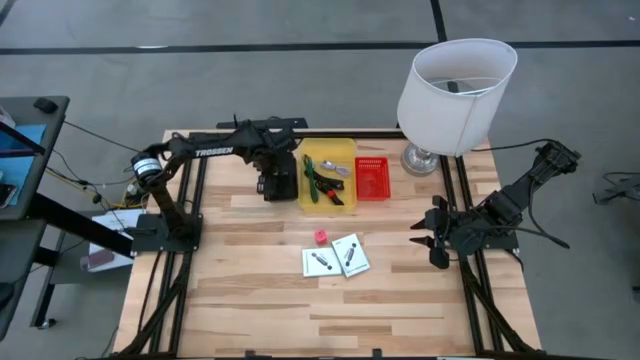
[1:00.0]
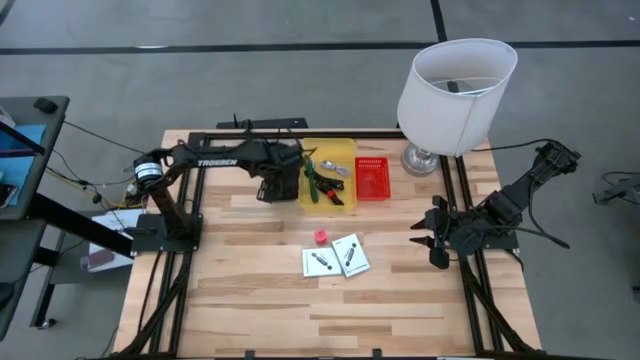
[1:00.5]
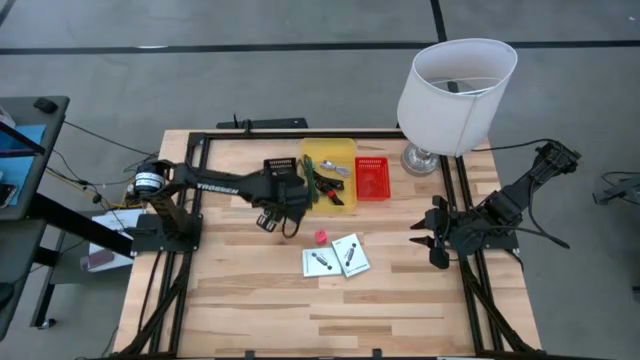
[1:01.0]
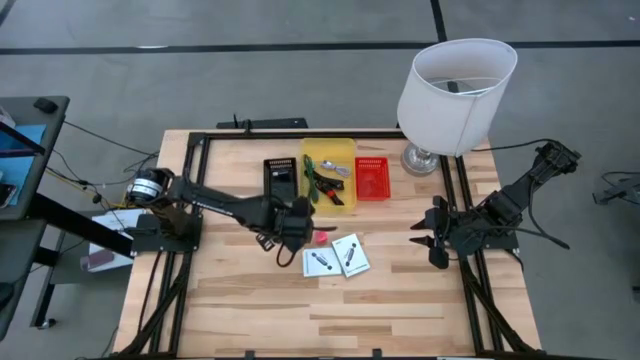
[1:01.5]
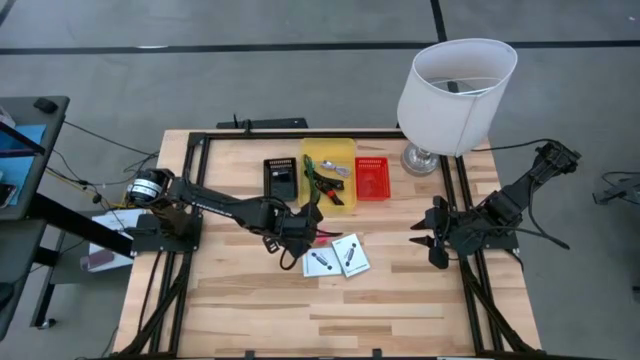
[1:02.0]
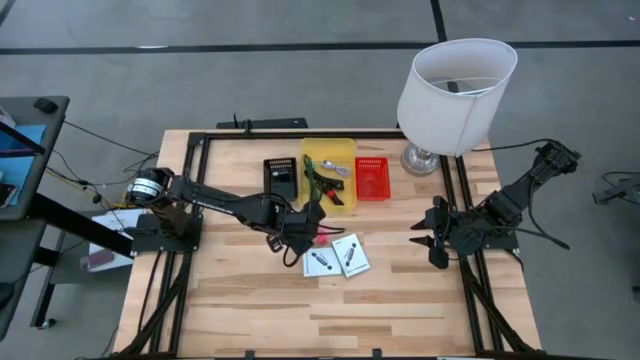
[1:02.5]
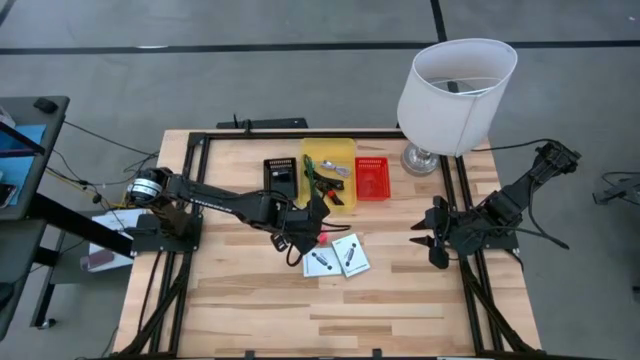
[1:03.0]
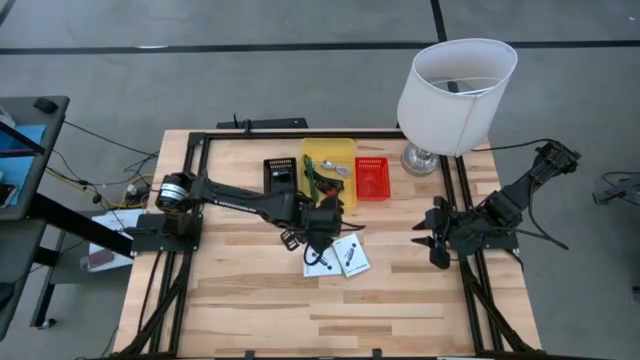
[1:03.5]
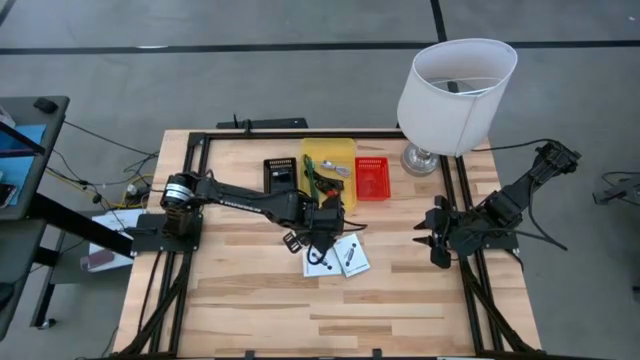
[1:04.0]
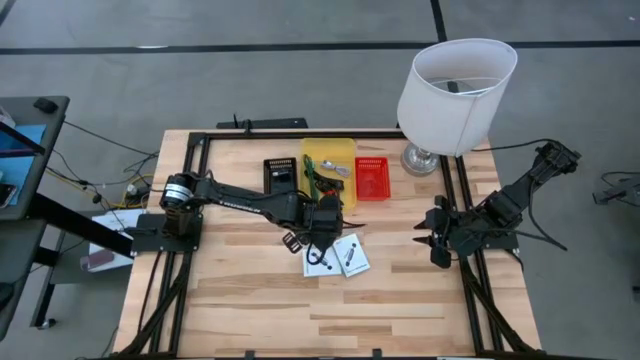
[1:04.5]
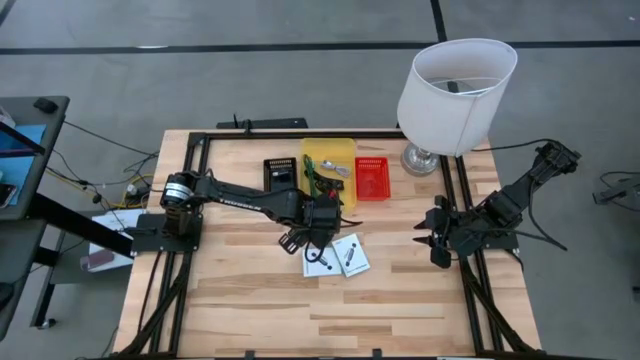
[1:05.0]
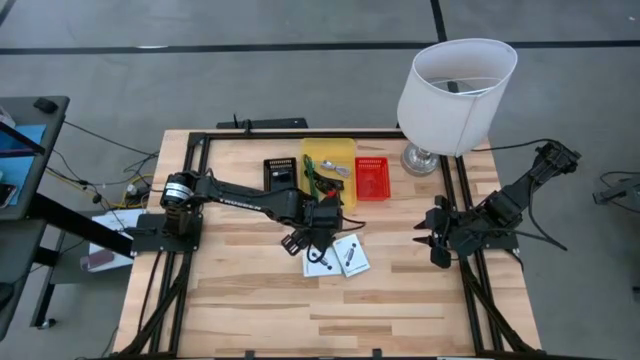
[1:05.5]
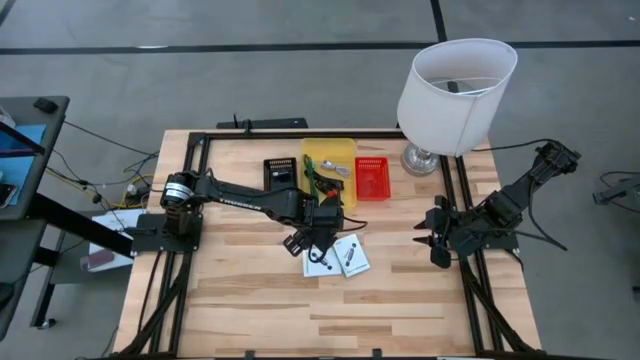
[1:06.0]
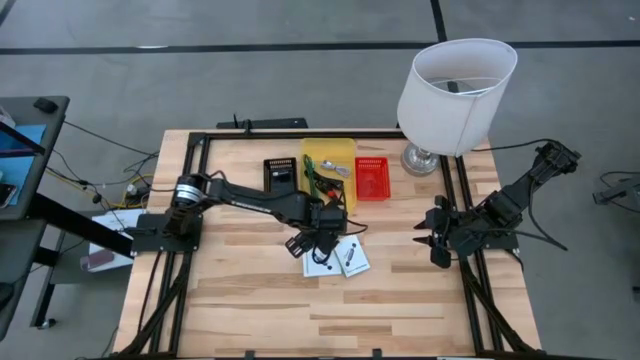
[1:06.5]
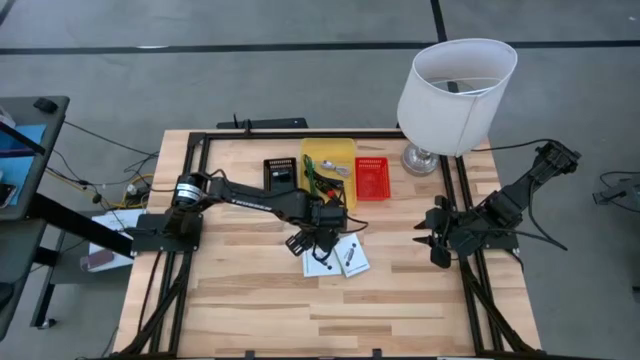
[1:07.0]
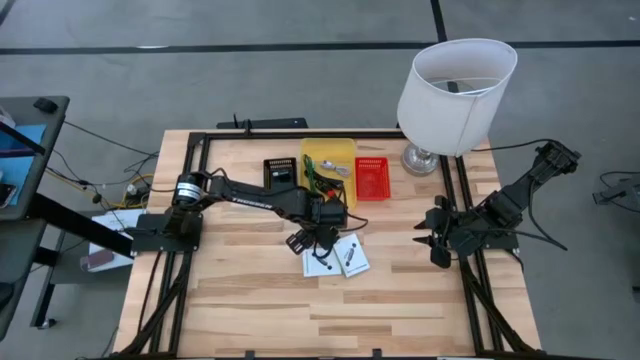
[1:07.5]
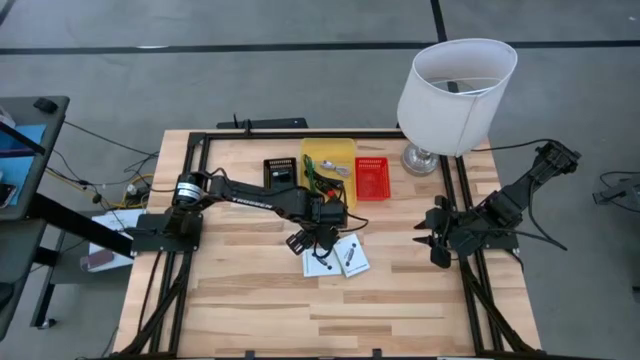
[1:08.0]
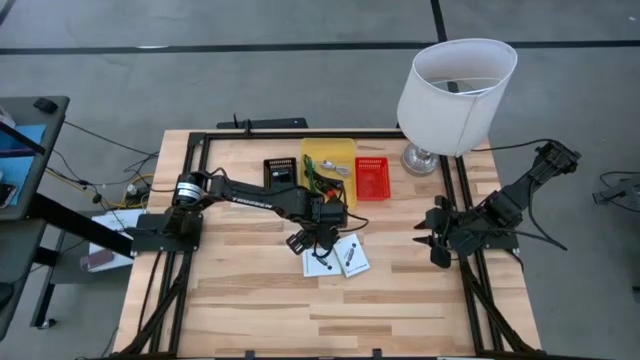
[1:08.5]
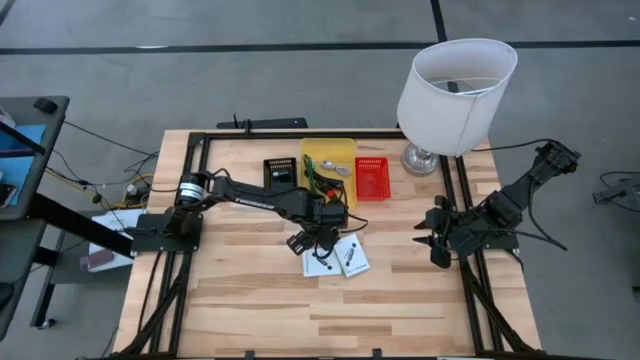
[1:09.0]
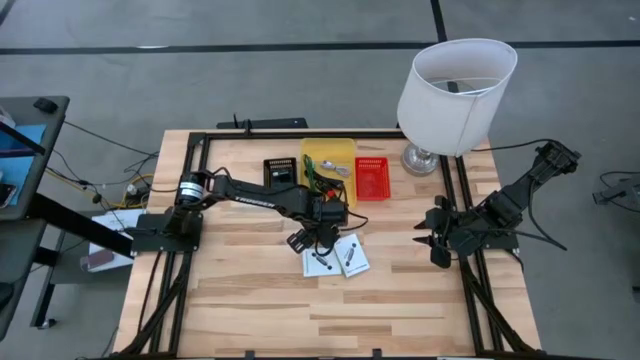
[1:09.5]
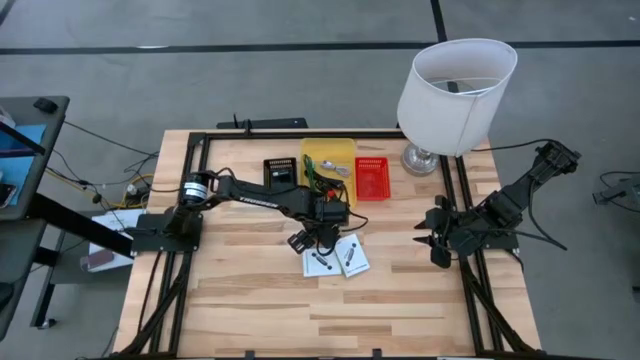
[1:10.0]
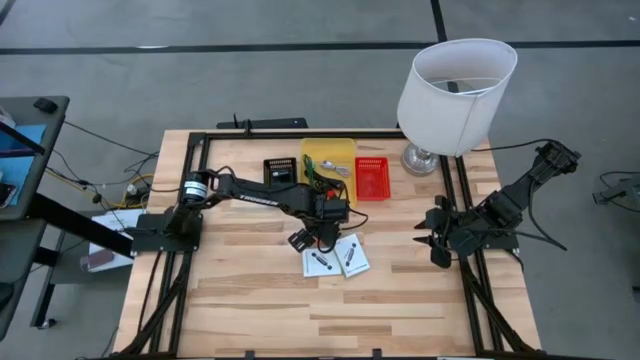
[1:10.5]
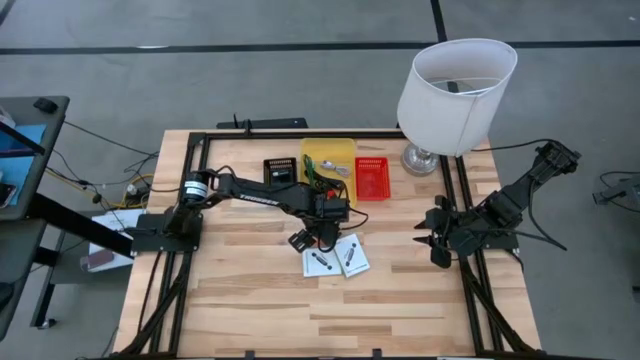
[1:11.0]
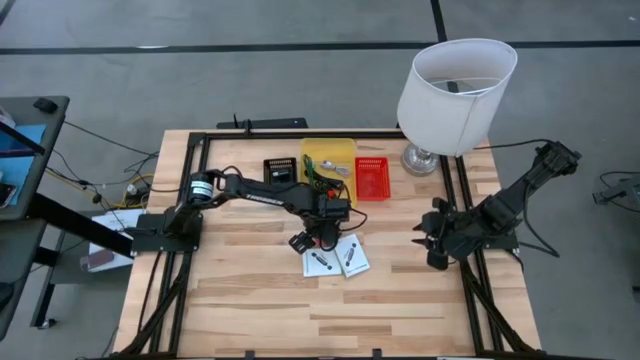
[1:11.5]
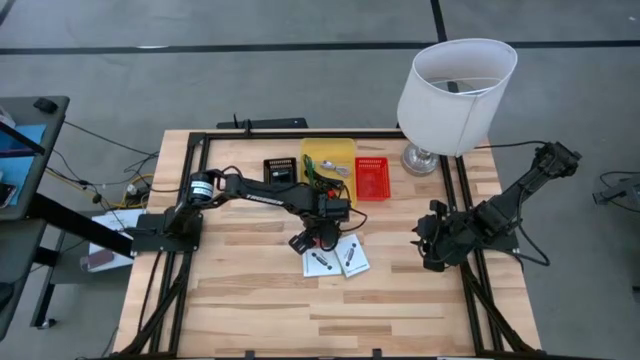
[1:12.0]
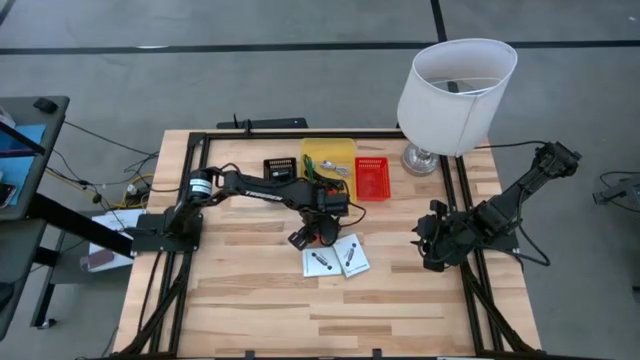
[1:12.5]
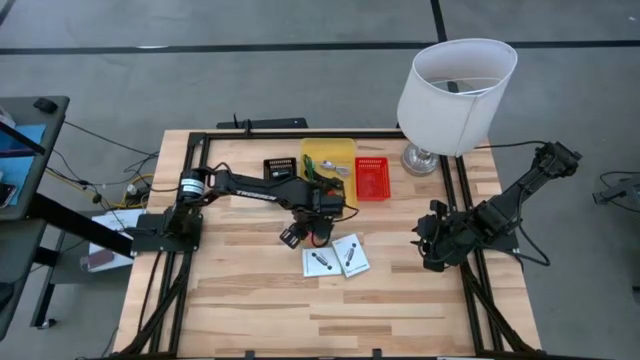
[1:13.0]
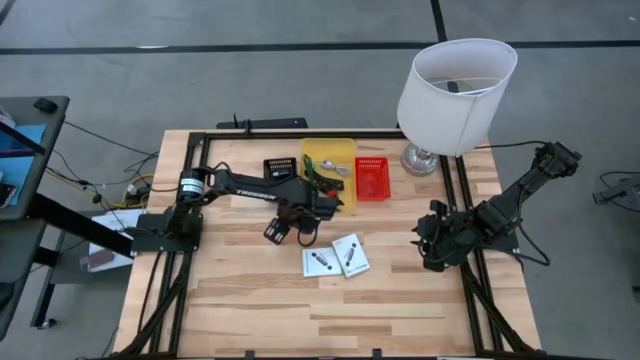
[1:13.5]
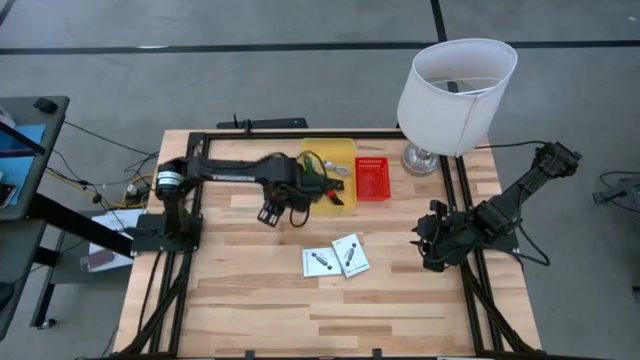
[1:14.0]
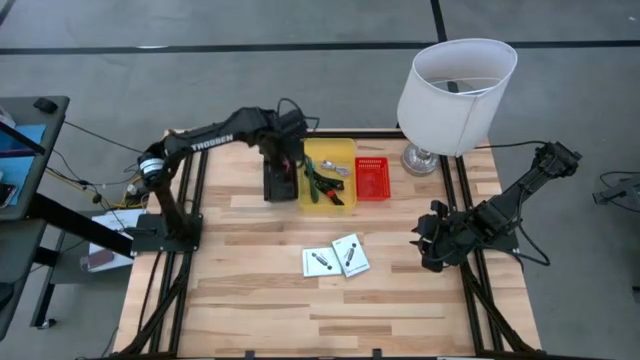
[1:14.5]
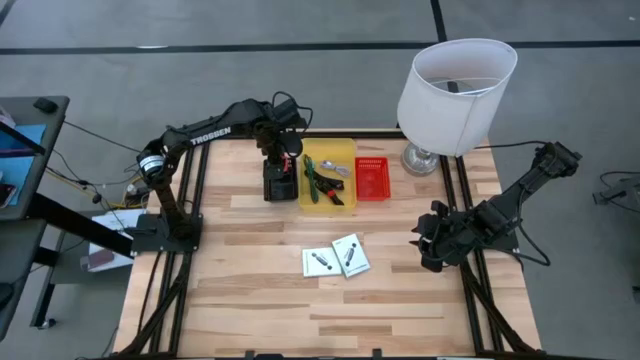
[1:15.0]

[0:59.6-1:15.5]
Task: Pick and place items into bin
Put the pink charger adapter into the black bin

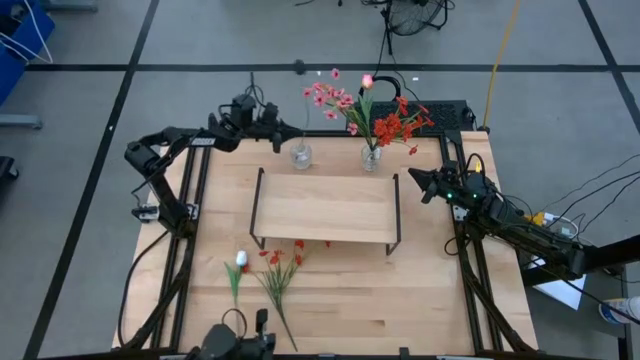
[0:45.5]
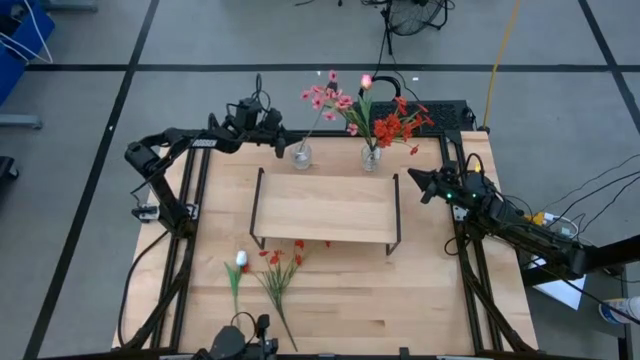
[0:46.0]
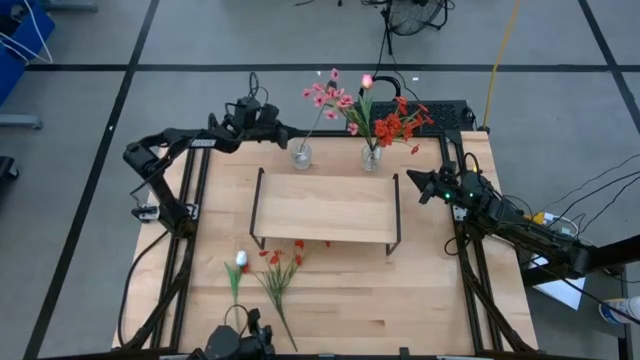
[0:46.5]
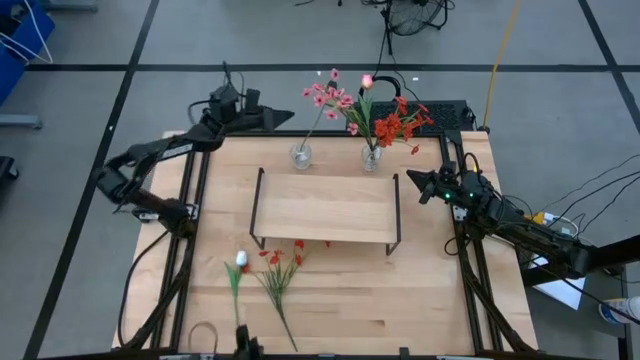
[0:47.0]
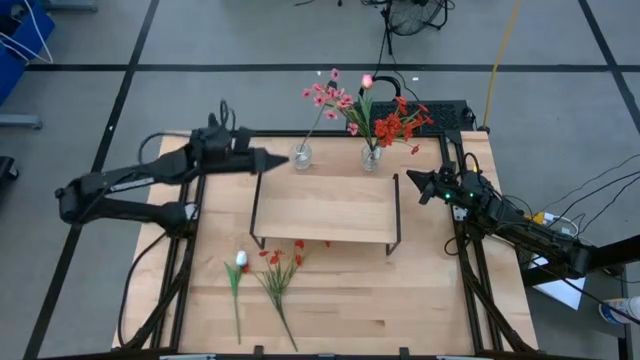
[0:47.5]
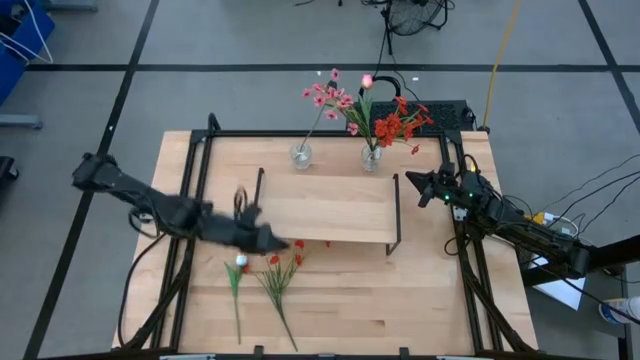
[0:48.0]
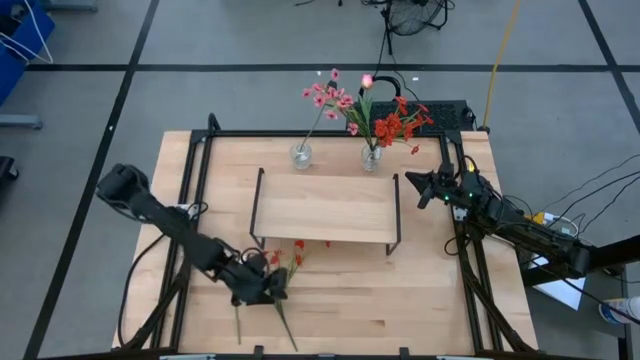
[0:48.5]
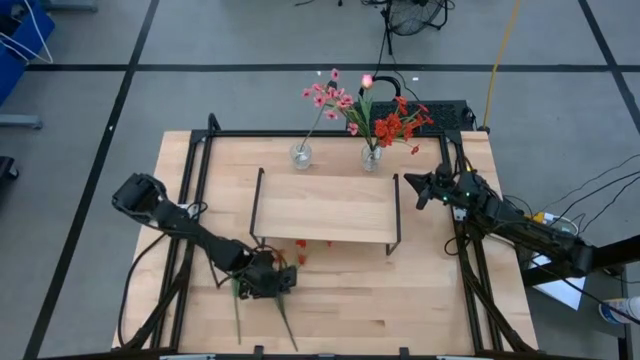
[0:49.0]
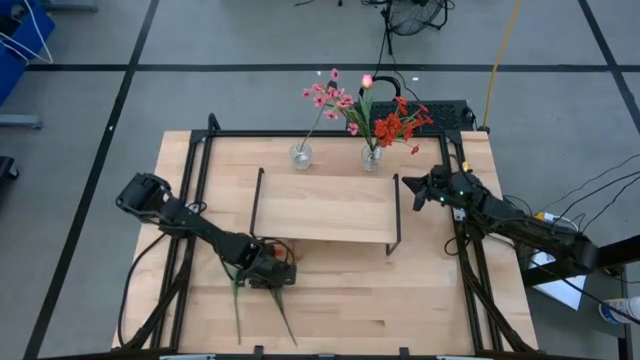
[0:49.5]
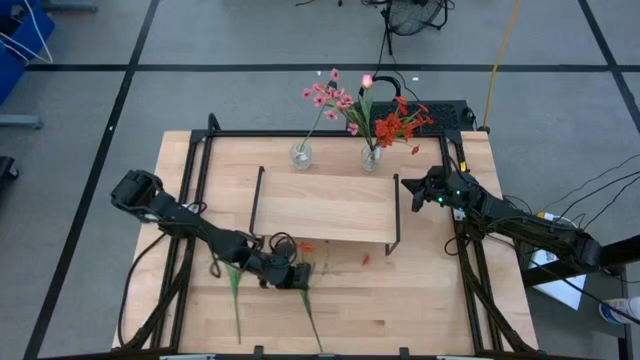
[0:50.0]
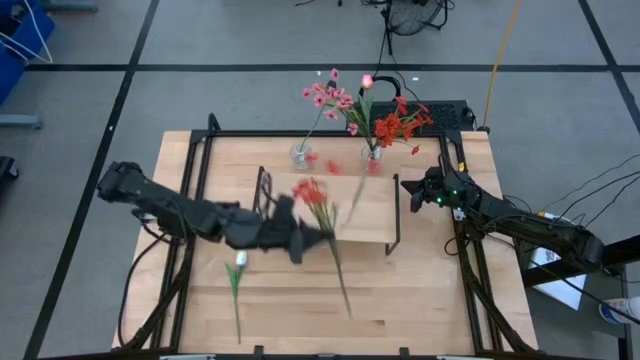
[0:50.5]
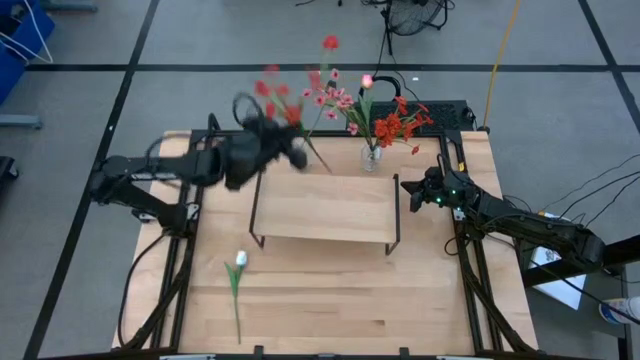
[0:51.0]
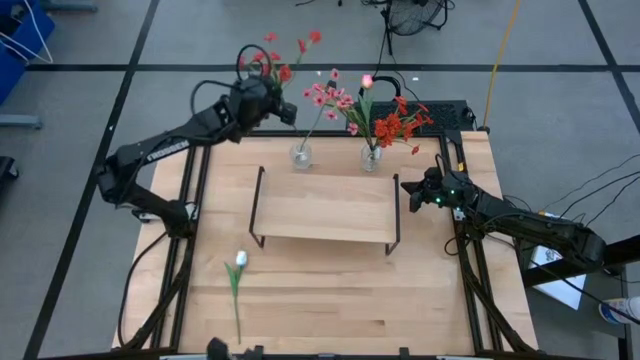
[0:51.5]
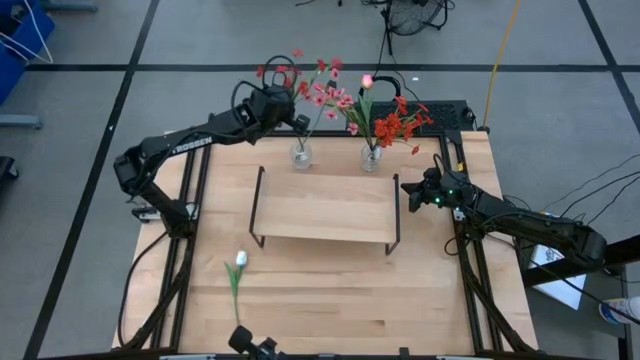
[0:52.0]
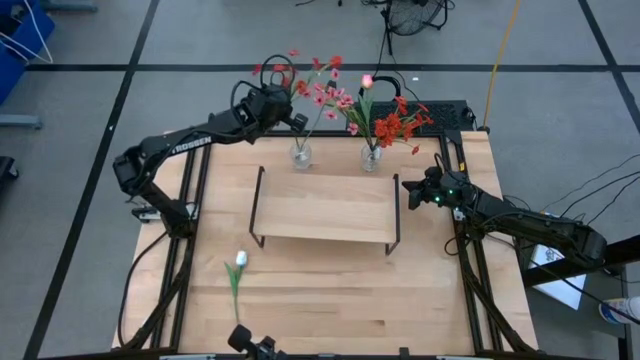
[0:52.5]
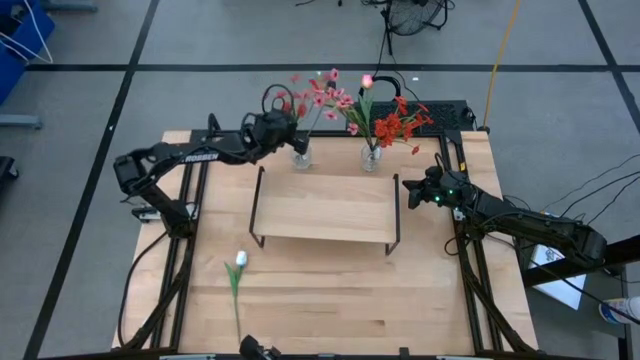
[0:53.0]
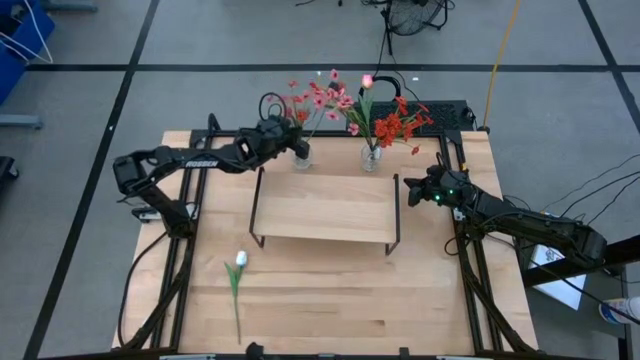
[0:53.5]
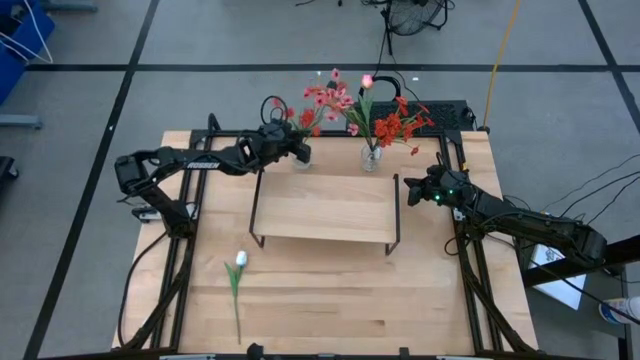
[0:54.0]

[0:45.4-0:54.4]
Task: Pick and place flowers into a vace then onto a shelf
Put the orange flowers into the left transparent flower vase
